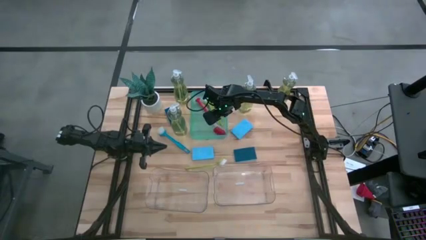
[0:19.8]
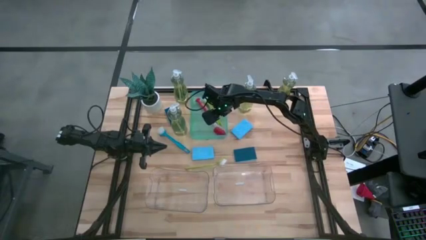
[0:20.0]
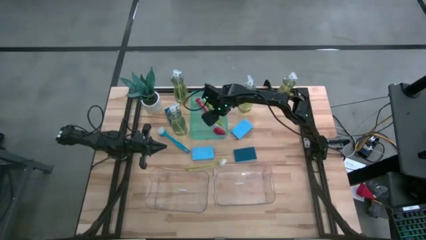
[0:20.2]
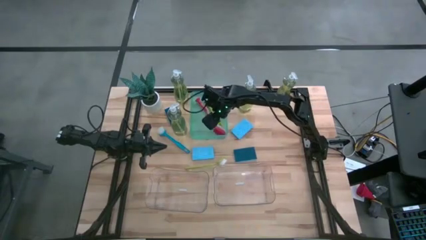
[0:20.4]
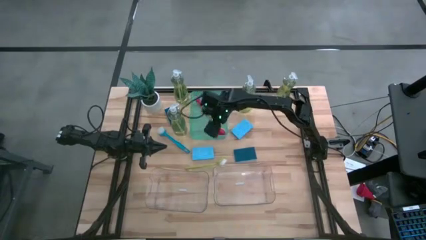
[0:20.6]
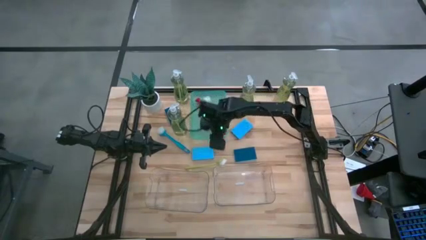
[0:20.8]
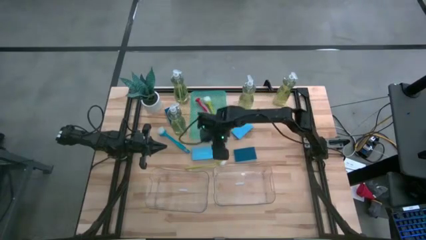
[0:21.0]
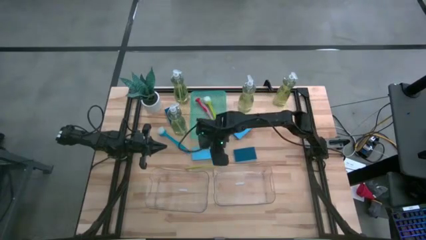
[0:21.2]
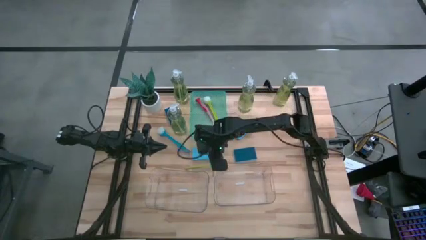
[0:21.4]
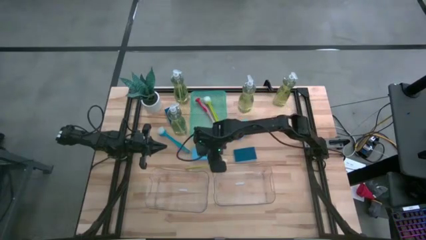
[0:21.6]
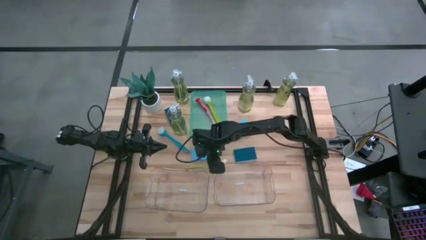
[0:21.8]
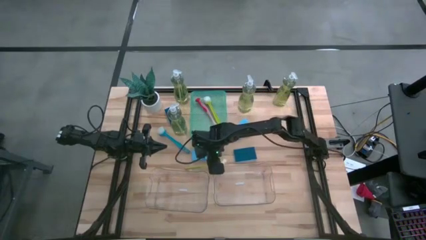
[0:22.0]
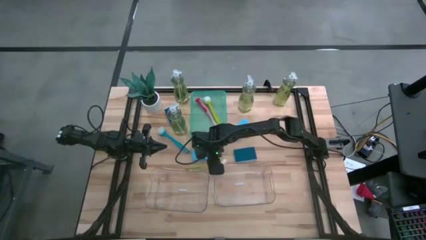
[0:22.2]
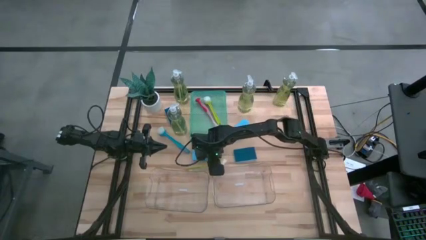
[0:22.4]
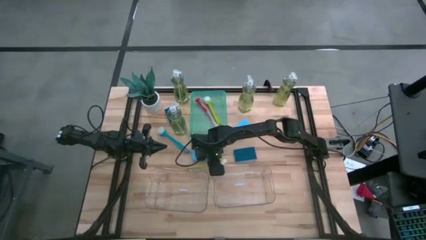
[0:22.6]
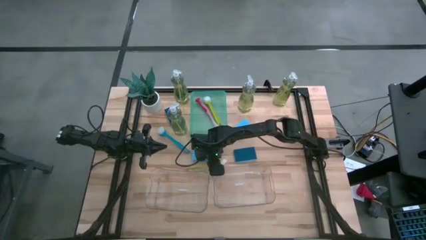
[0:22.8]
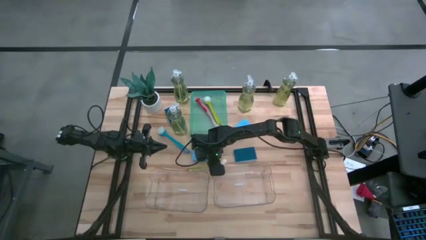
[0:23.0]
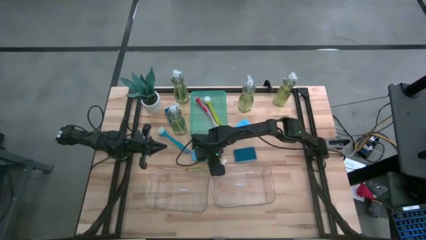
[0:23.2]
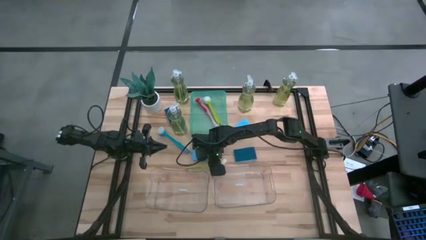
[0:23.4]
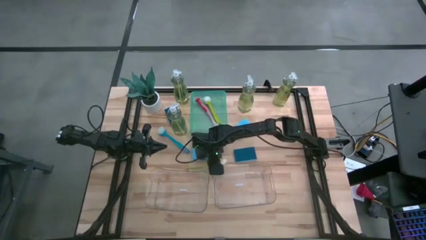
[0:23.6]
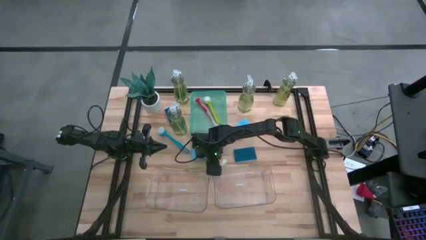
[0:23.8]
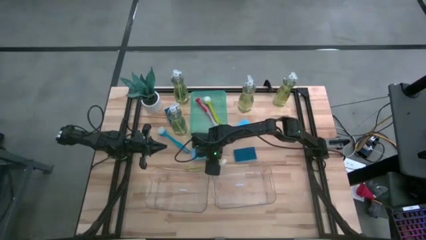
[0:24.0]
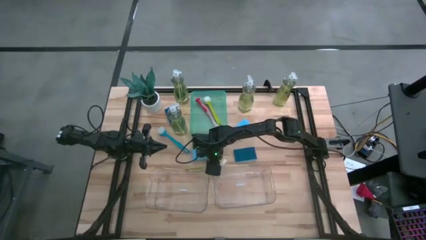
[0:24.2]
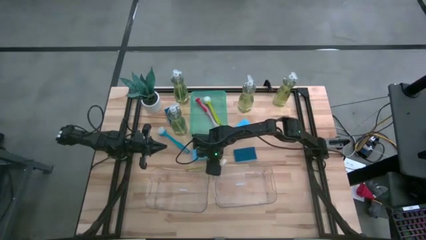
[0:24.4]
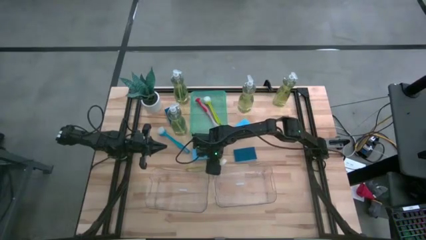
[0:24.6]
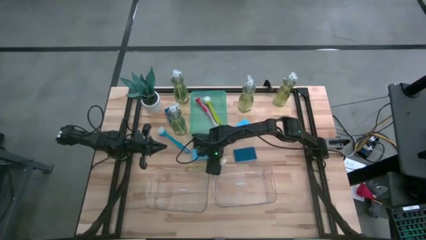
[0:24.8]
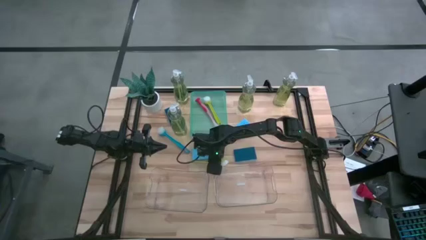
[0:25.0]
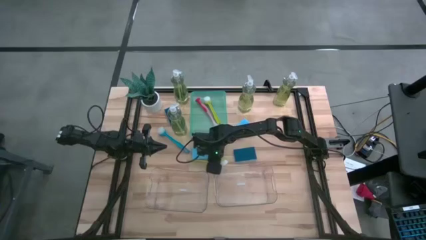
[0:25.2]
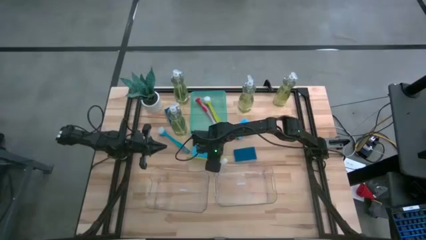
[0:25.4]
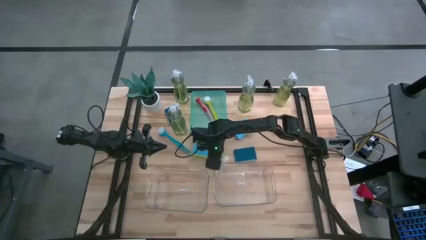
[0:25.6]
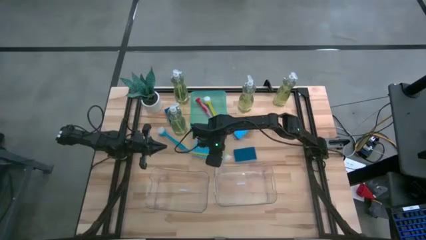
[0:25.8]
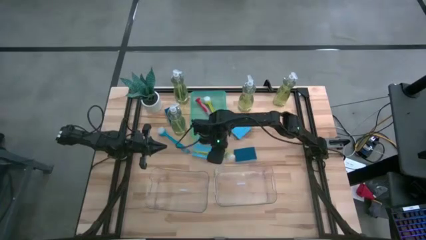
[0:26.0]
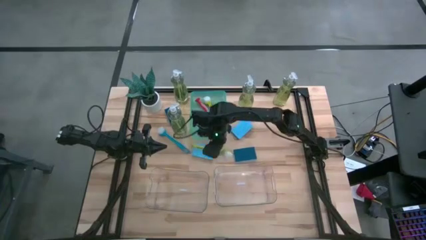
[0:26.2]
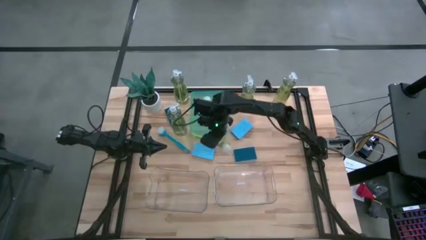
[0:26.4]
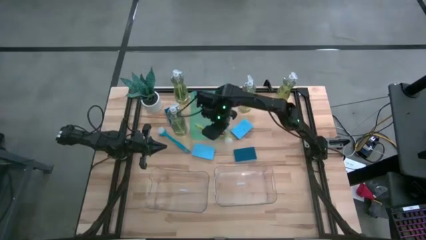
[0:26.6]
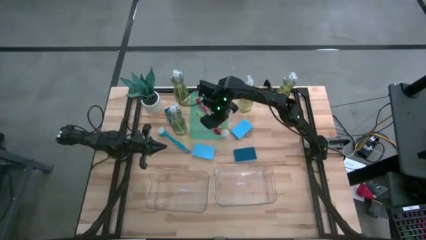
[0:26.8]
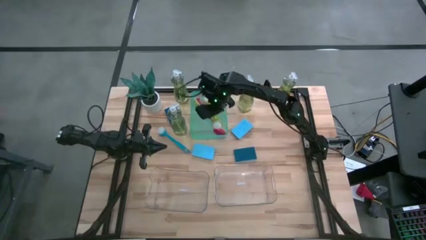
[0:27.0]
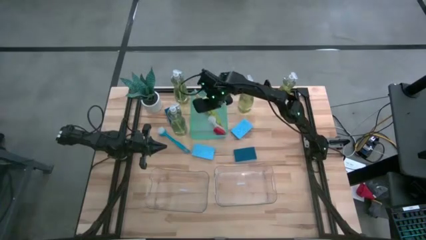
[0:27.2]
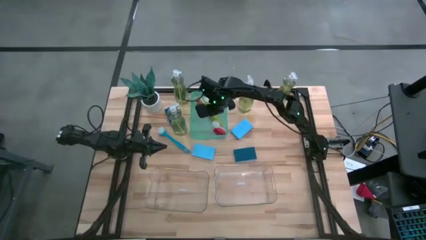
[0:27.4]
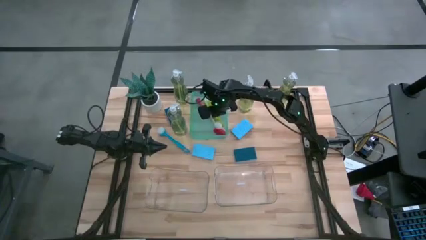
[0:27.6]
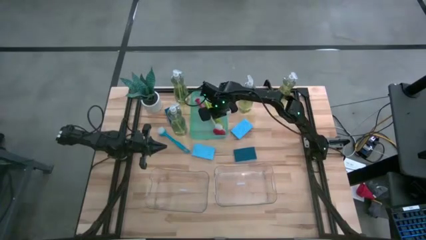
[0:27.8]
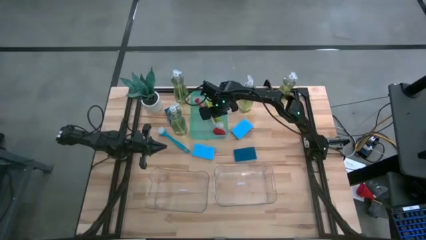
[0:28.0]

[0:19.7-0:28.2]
Task: Pick & Place Kitchen Sink Supplies
Put the green dish brush into the green bin

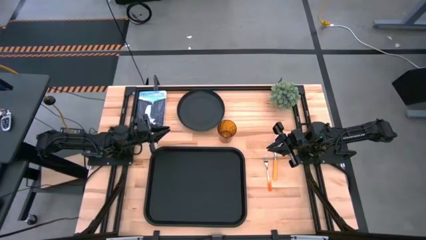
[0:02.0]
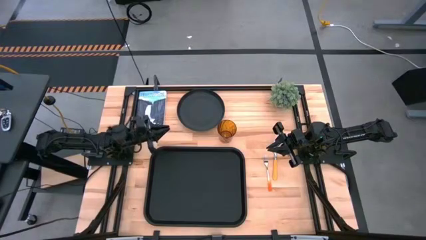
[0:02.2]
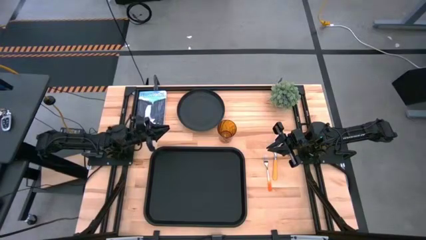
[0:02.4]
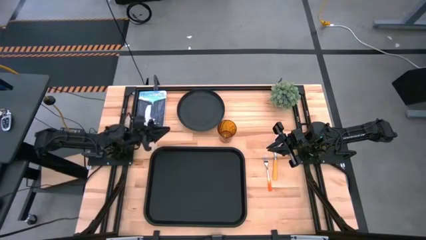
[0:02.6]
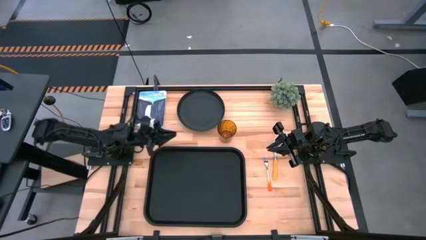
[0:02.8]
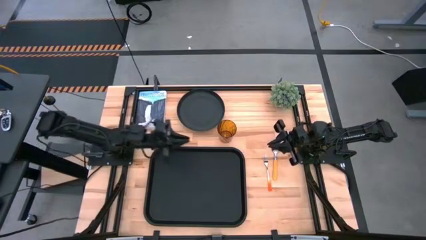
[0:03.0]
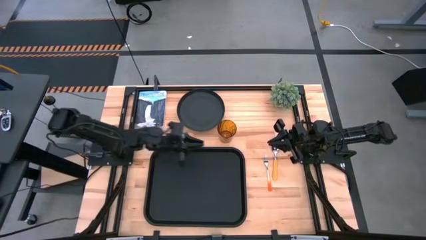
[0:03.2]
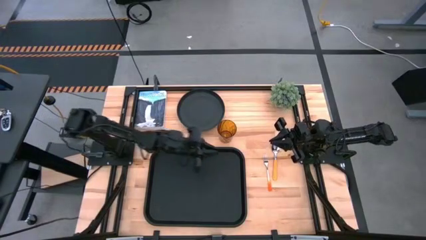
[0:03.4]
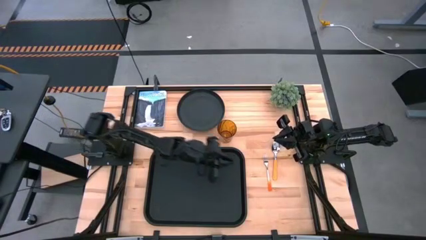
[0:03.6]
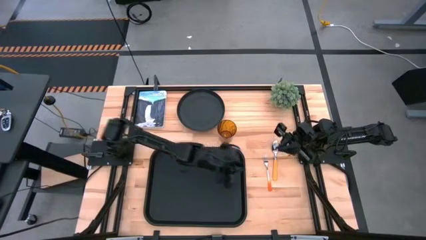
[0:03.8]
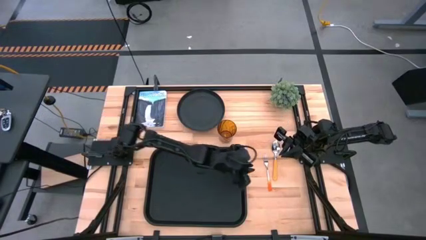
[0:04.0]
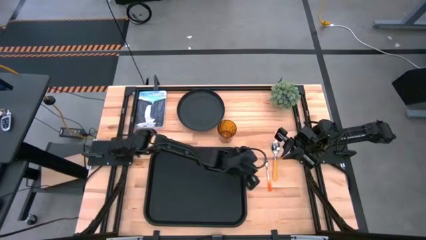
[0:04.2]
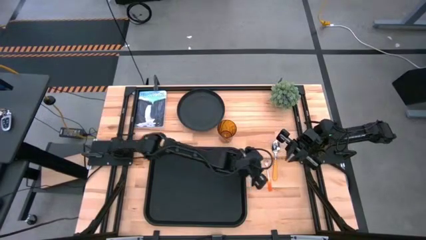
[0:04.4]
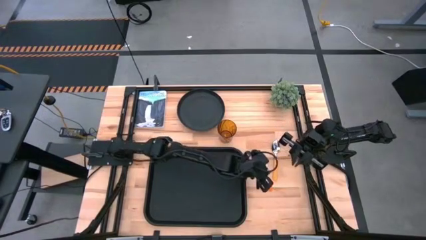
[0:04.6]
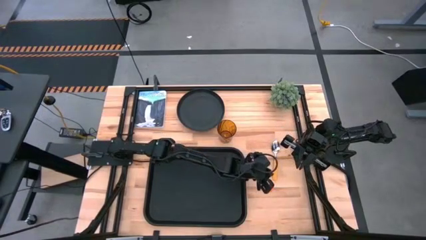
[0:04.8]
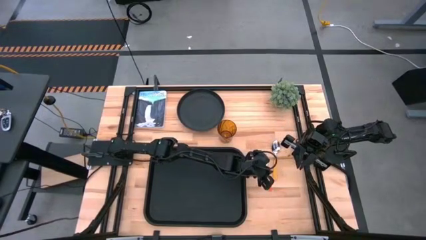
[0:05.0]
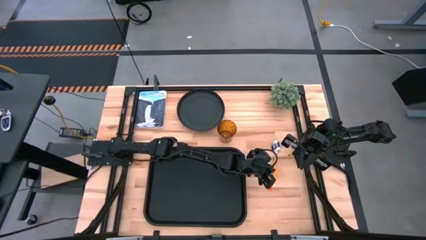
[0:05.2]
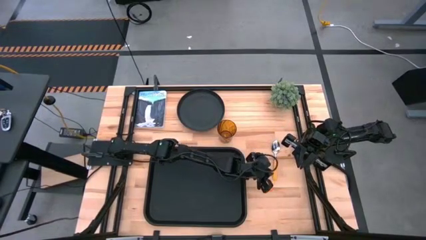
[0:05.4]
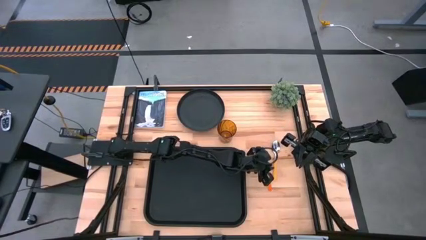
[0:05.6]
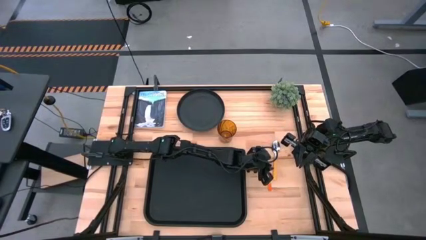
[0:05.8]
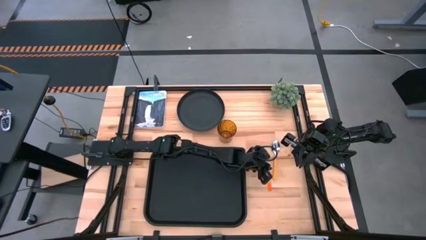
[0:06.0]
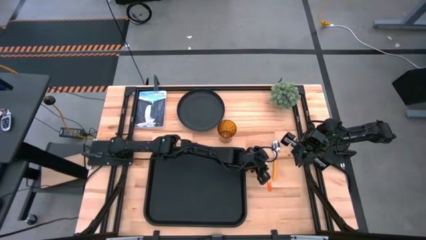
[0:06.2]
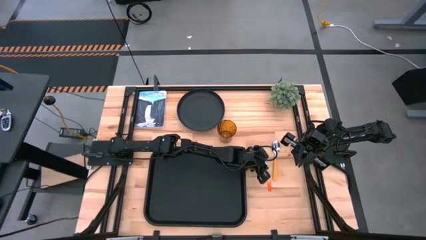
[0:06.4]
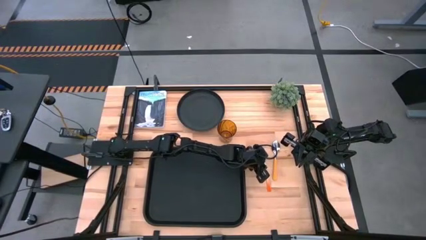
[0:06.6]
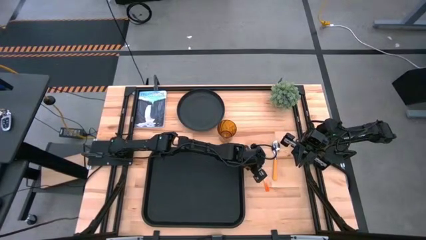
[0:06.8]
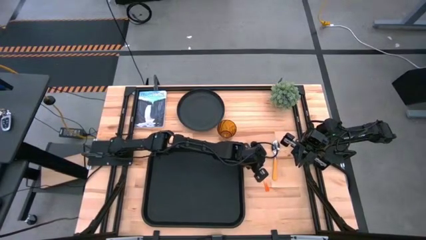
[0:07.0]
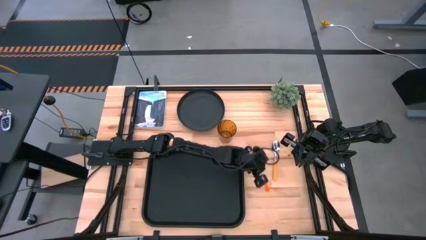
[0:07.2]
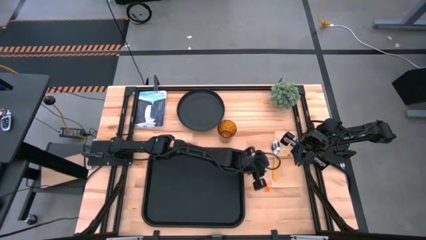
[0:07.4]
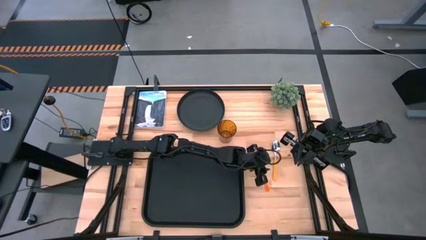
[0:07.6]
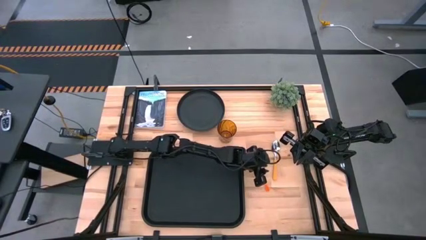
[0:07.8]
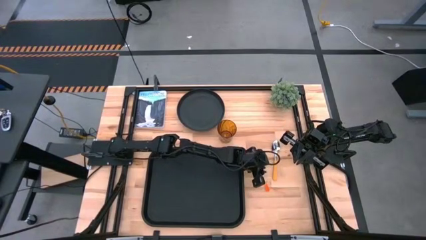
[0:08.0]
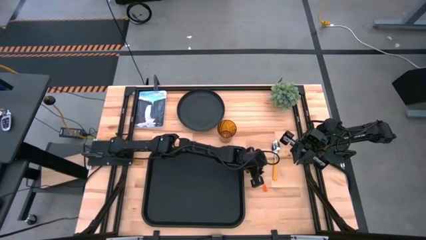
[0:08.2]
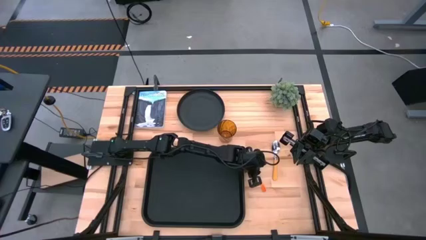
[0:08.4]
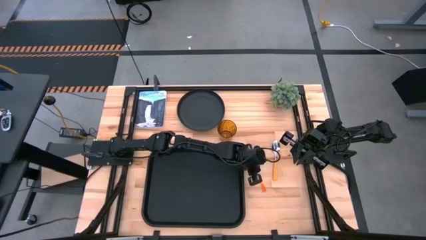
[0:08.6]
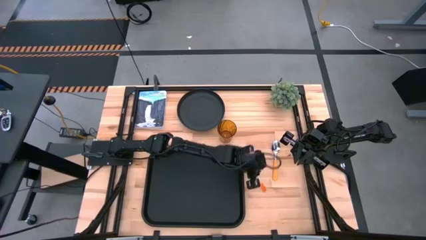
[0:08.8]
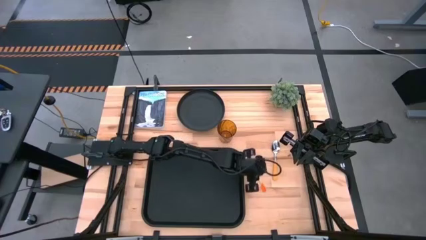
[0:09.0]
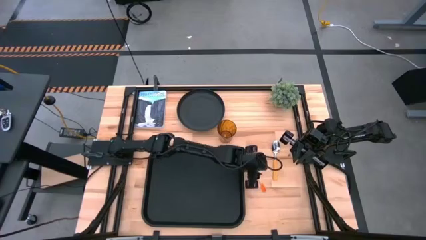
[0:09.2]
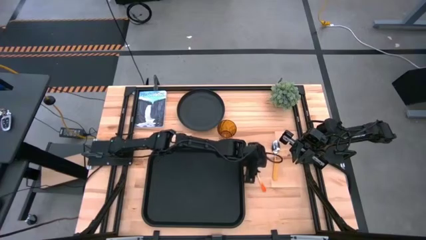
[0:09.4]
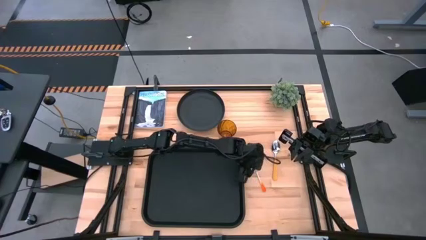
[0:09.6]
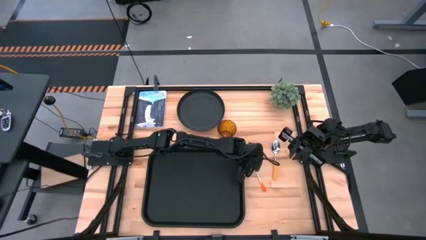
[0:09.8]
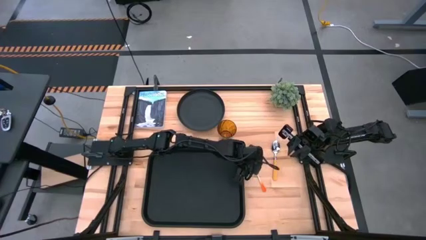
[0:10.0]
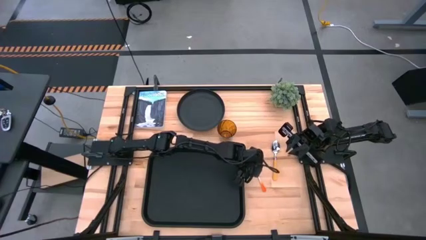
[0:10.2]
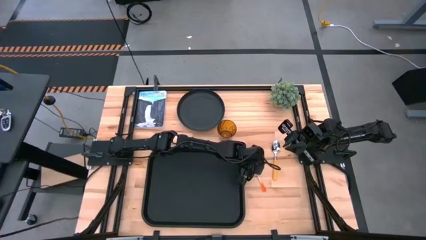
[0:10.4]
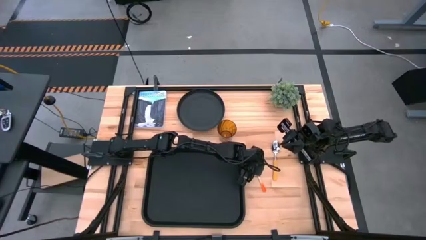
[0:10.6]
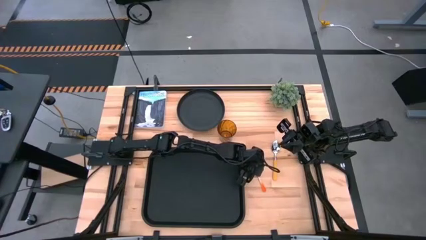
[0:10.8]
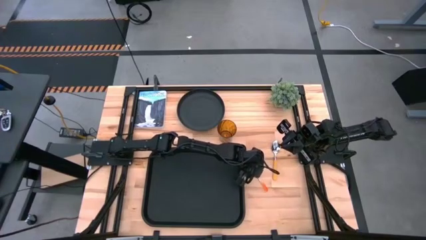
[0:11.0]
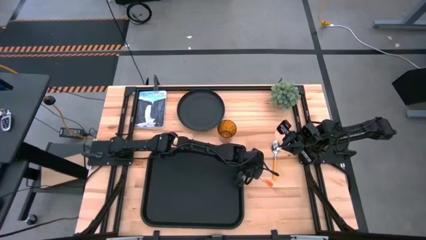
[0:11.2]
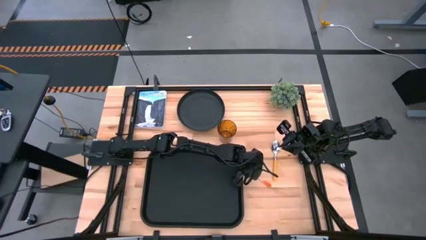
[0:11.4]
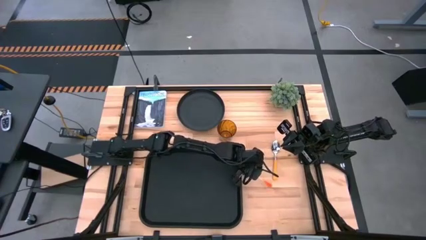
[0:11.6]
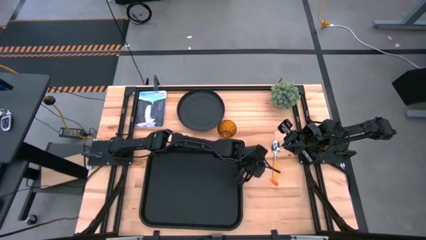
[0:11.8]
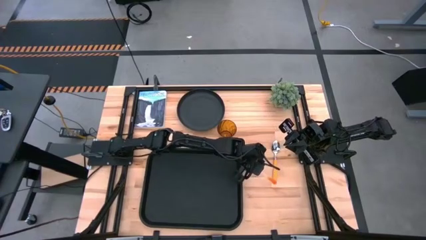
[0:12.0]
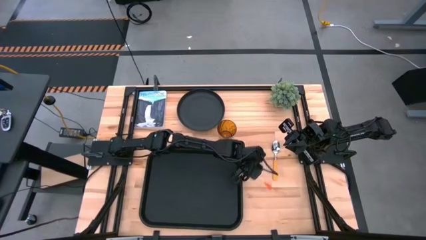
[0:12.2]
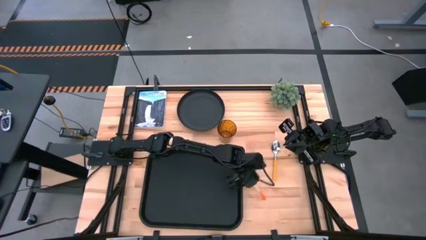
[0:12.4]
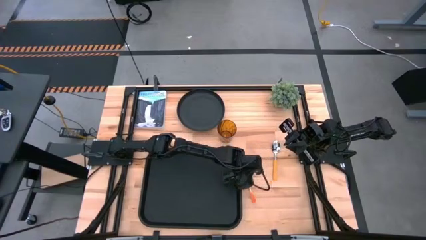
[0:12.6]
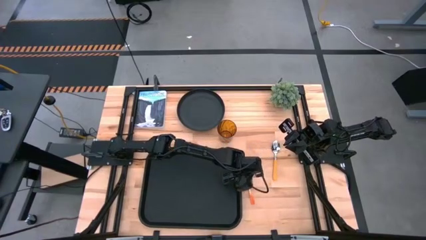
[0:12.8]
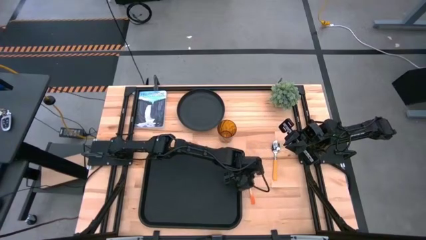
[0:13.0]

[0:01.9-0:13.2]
Task: Pick and place plate/cup/fork/spoon on tray
Prepare the orange fork
